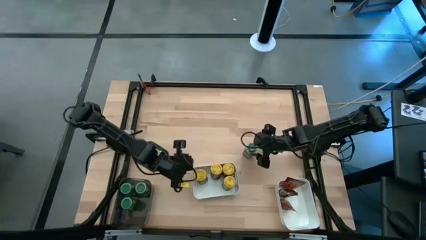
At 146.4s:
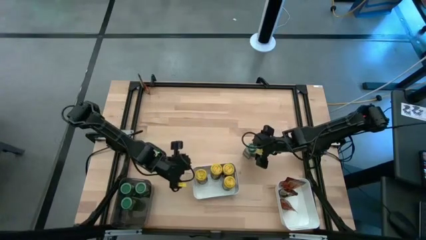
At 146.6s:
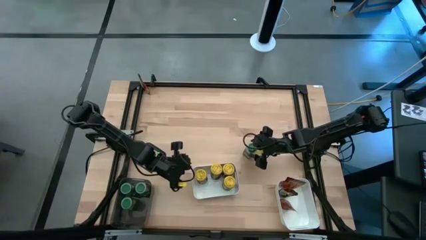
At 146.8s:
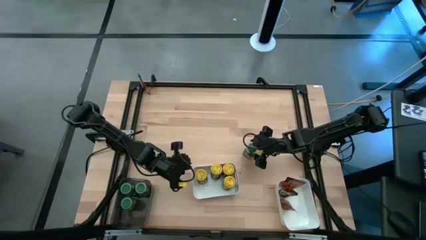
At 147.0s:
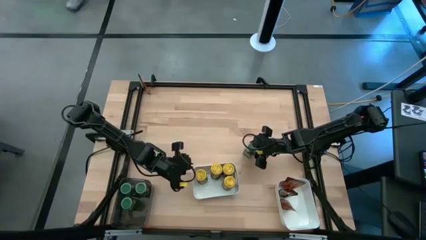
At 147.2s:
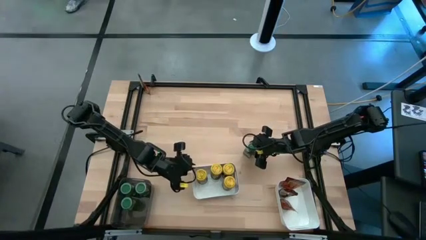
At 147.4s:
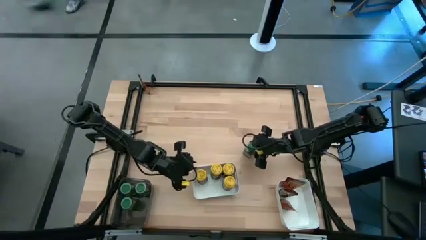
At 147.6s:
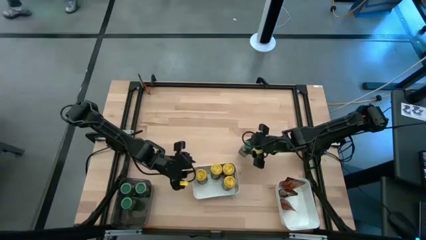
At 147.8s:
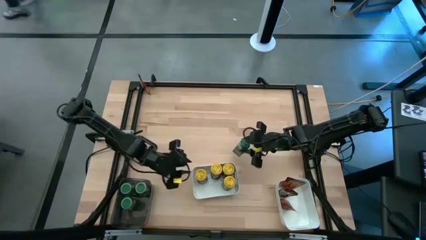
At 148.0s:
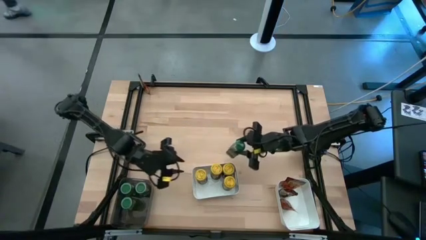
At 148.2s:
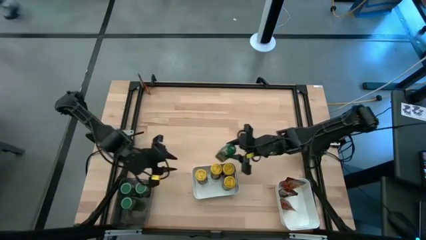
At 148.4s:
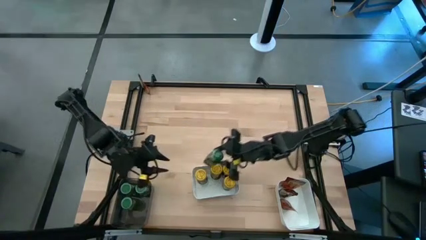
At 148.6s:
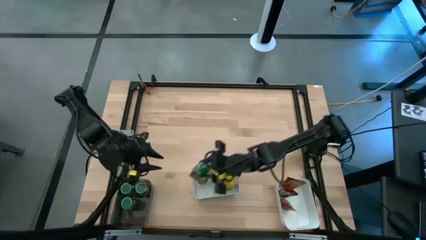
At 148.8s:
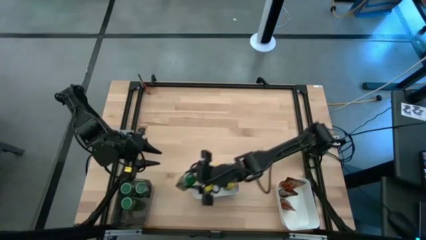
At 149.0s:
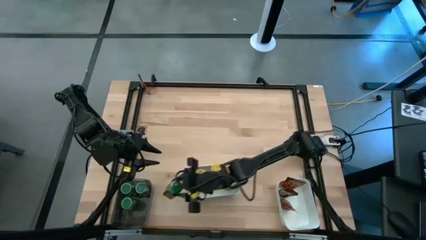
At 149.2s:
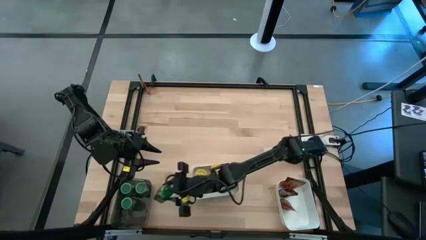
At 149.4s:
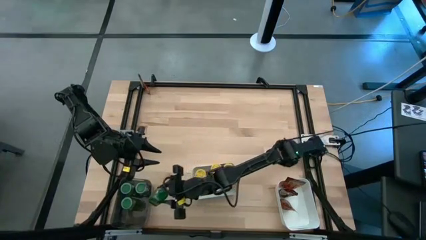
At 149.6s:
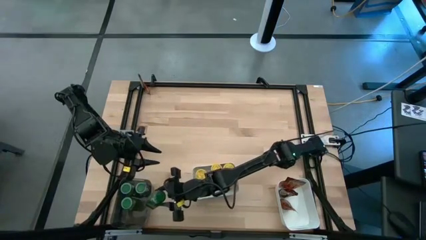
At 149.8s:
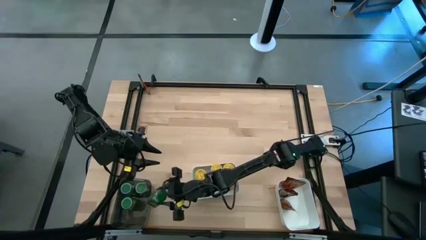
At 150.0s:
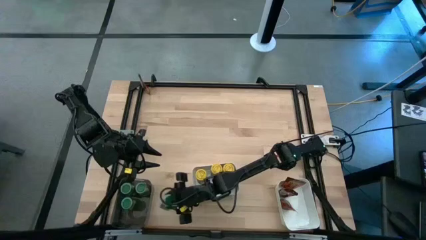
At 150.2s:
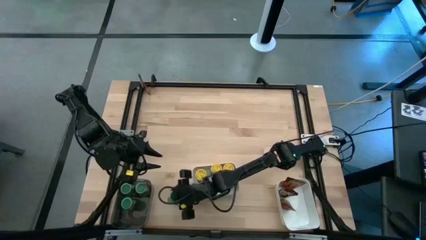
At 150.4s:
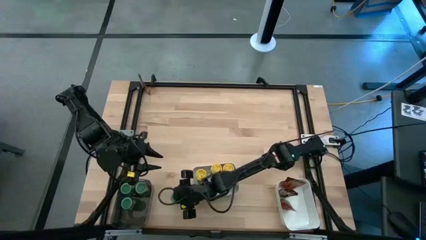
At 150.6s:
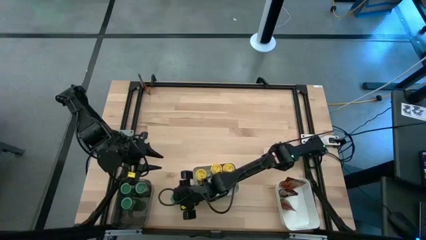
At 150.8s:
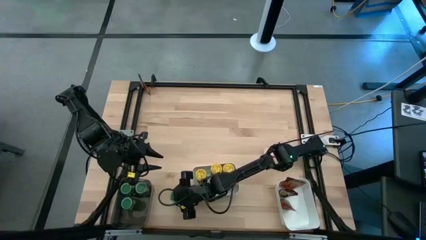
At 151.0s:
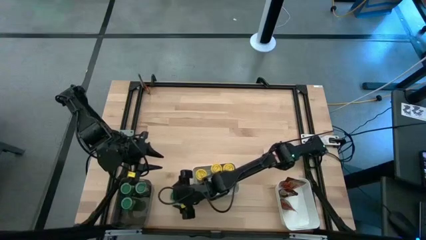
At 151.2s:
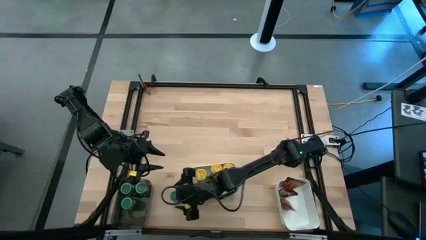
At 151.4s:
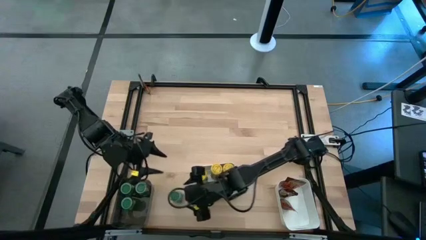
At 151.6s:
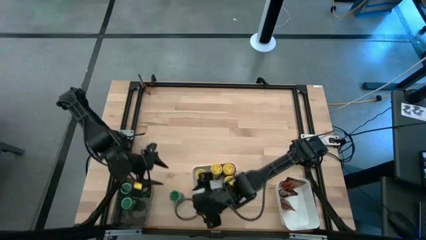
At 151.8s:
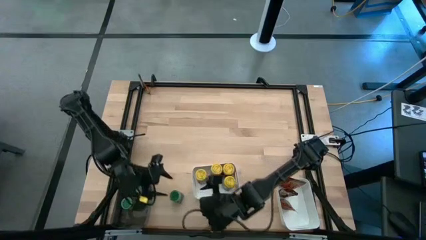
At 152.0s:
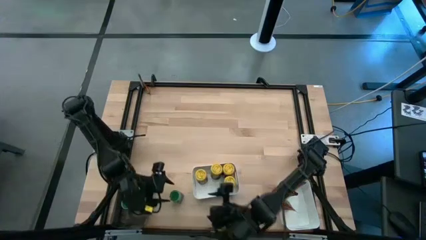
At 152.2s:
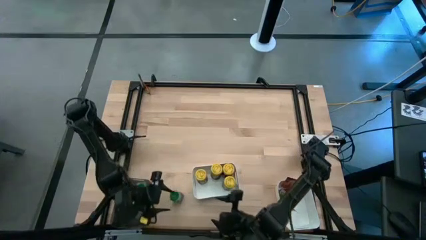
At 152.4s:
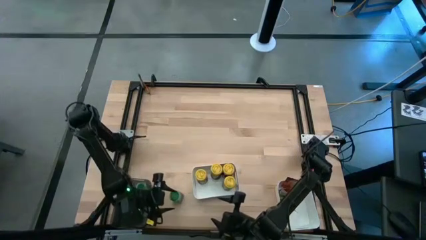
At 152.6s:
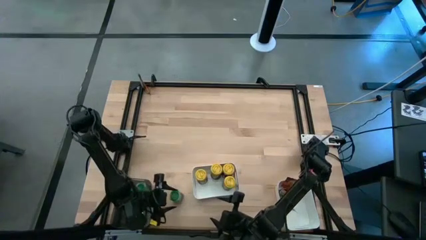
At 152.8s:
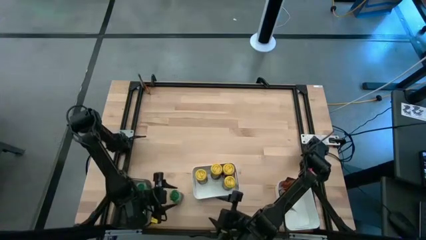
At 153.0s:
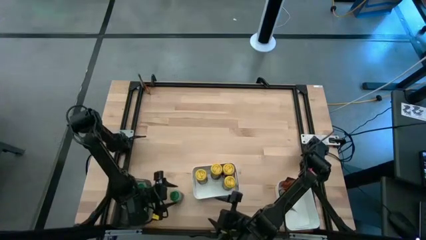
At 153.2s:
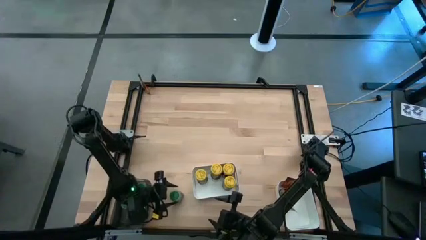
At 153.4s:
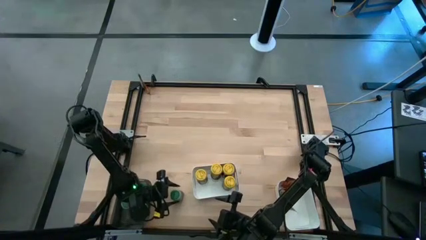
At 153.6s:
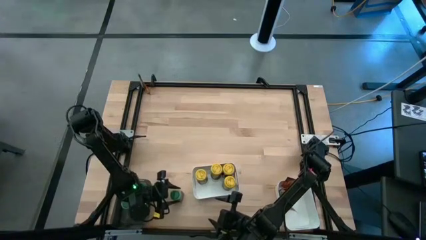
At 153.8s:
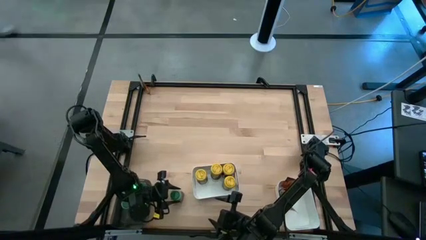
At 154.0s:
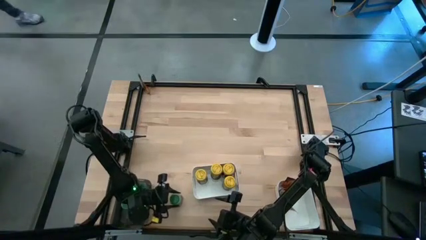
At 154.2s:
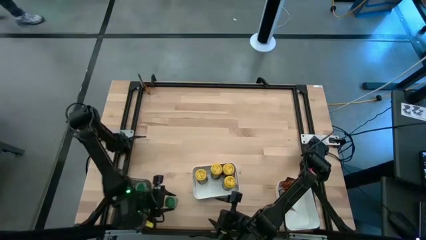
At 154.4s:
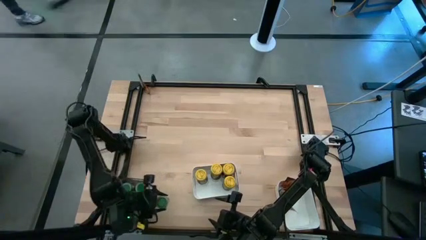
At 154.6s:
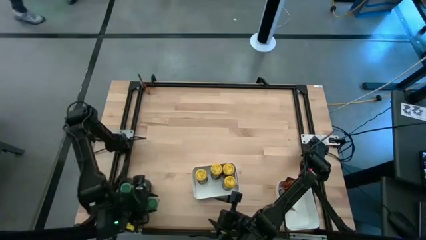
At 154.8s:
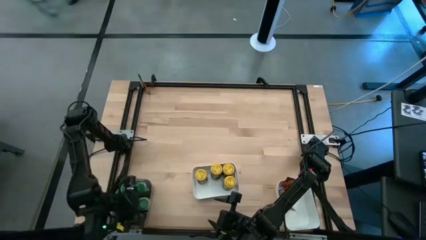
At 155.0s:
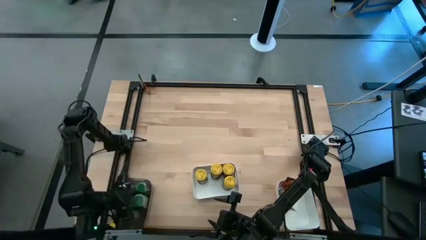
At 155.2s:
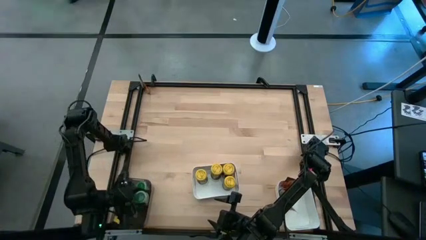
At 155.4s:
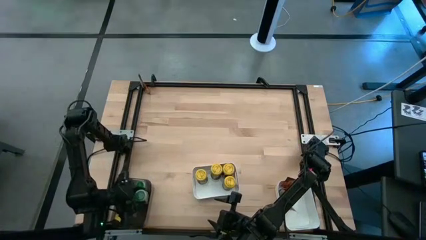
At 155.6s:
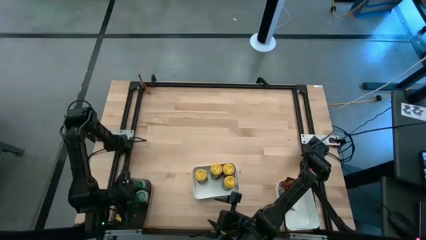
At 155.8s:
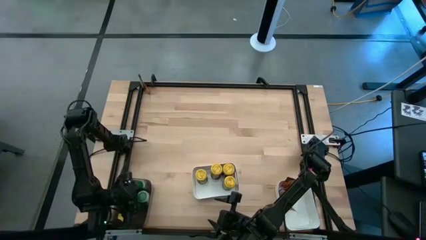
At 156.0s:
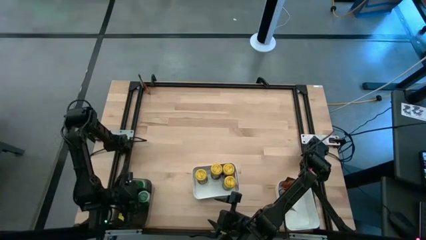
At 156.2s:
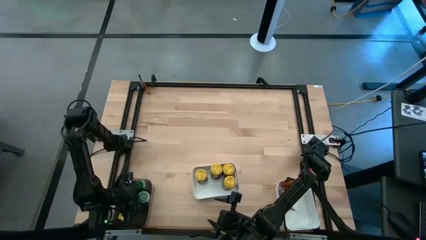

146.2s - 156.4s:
Task: Sort spices by type
Put the green seasoning bottle into the black bin

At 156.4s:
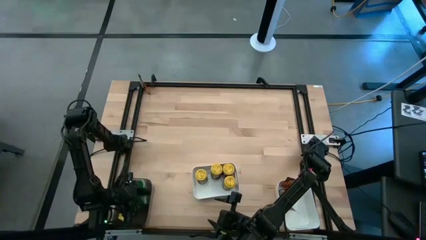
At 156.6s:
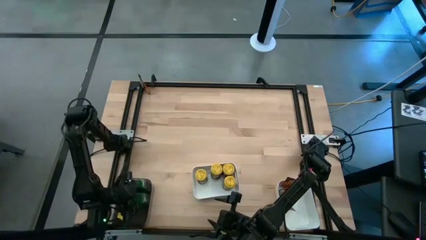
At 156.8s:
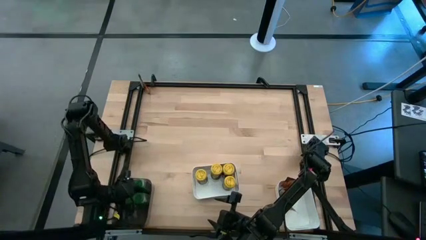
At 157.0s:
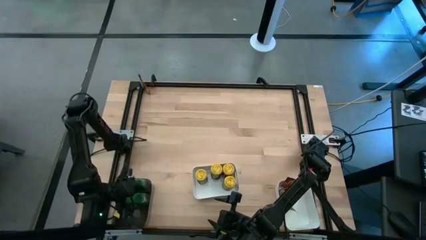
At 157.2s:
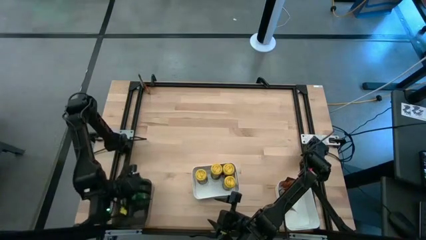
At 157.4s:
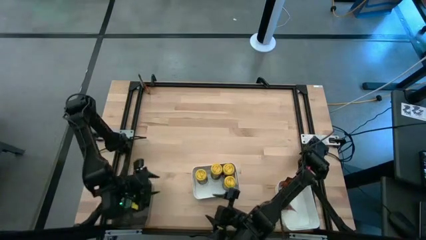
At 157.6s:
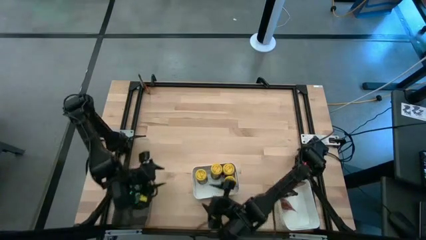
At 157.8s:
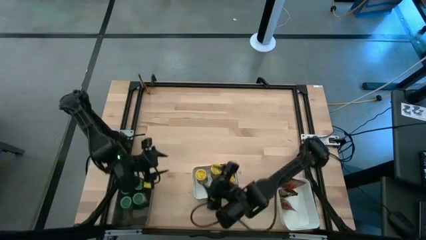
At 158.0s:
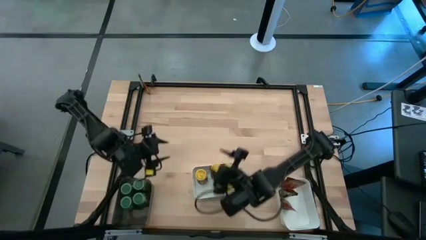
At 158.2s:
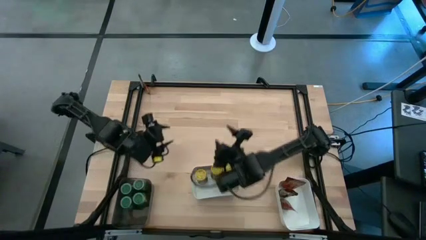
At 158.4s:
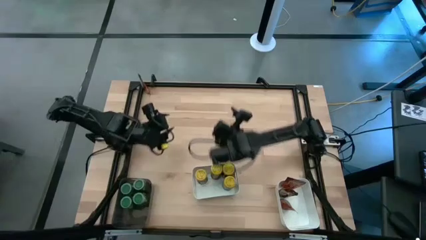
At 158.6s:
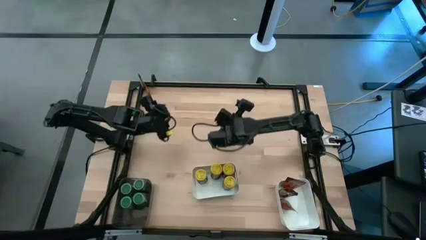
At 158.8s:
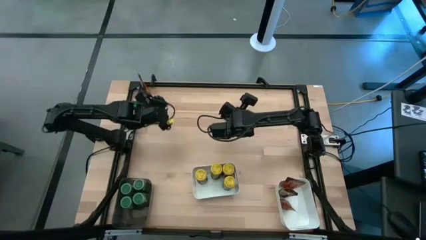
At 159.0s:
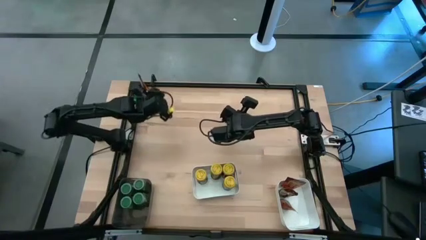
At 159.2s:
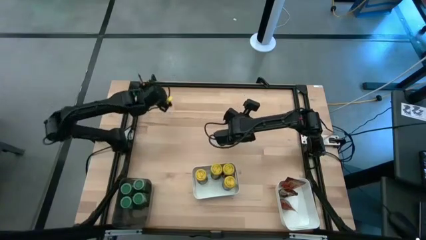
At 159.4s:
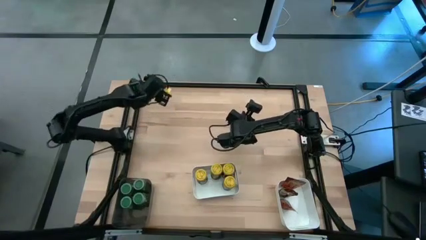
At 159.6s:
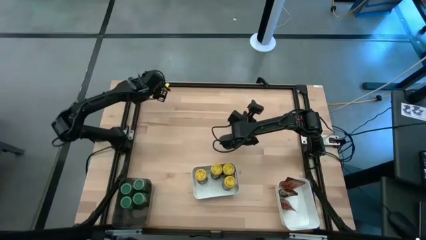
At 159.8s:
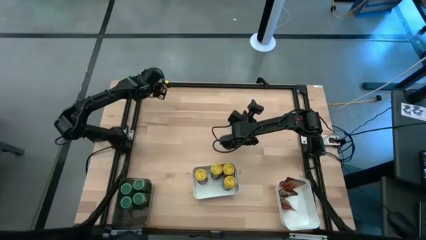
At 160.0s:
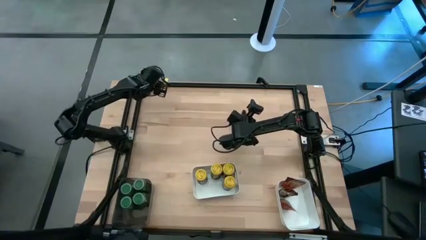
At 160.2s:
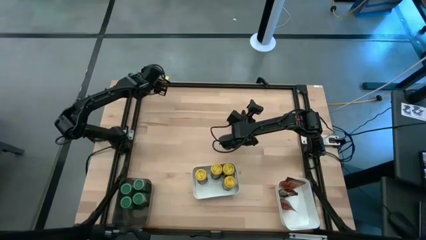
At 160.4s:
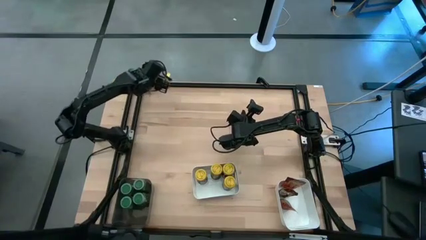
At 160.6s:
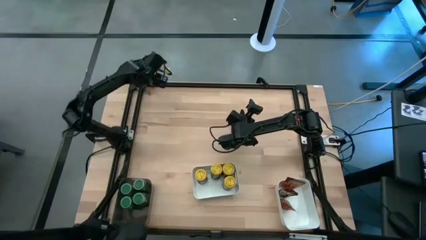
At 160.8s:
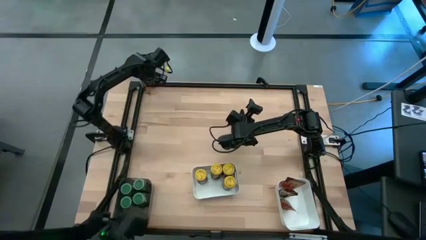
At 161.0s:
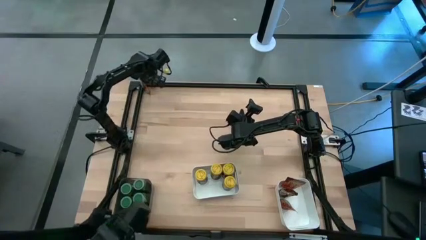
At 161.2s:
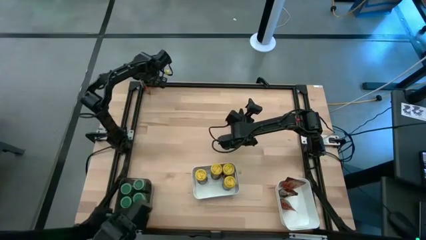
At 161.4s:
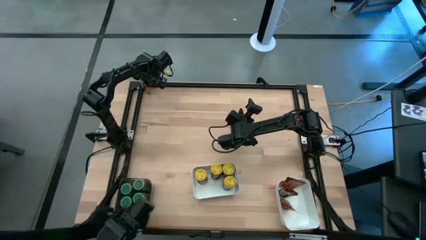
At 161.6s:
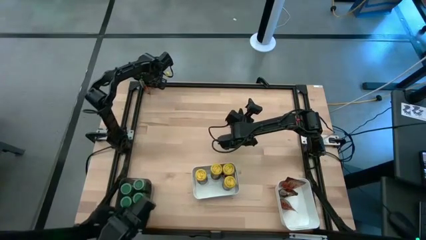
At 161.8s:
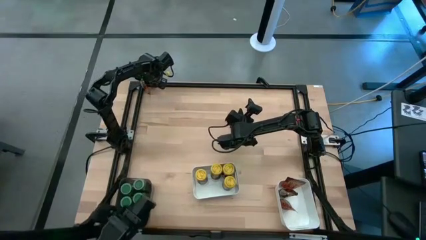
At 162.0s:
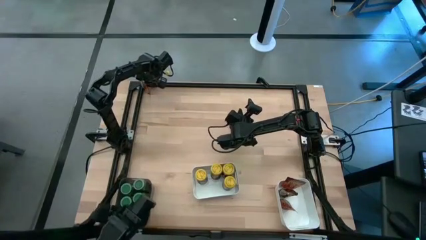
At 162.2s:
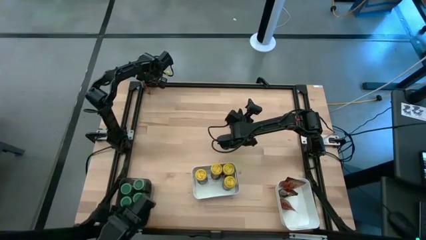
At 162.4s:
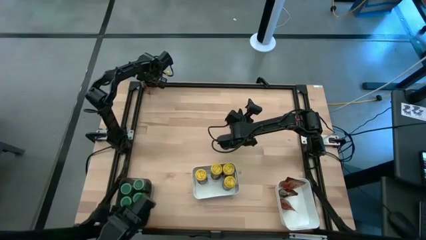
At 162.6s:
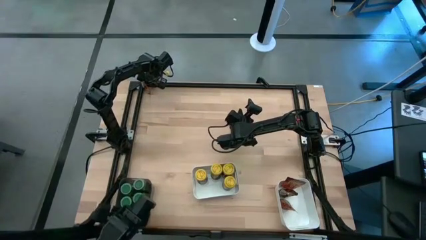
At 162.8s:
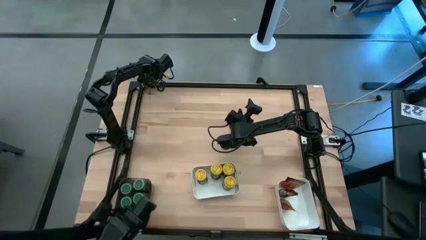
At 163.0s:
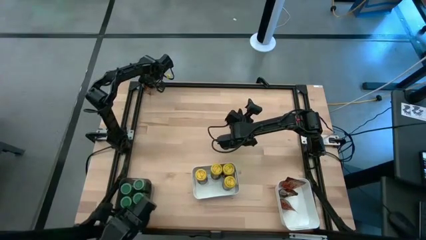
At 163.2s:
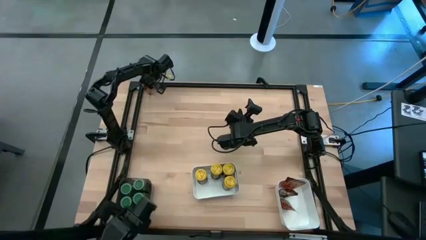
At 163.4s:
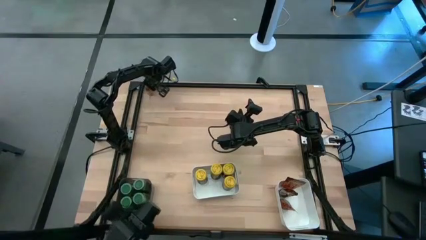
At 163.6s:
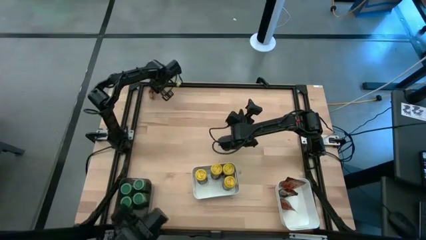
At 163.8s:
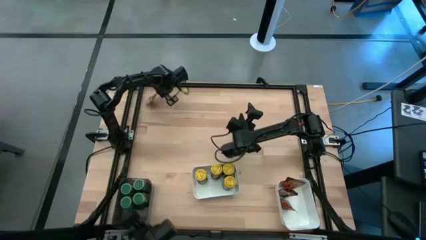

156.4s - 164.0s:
Put the brown seasoning bag into the right white bin
